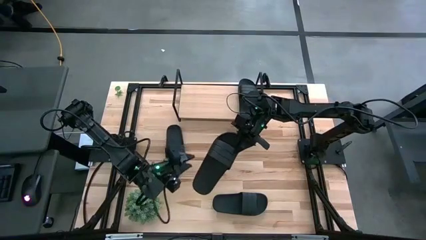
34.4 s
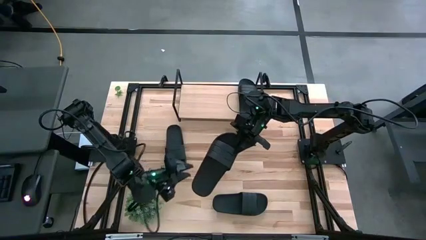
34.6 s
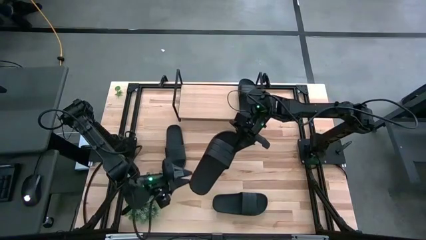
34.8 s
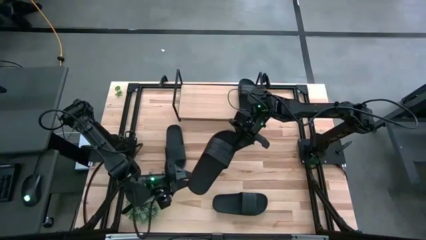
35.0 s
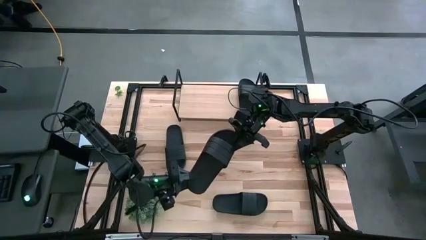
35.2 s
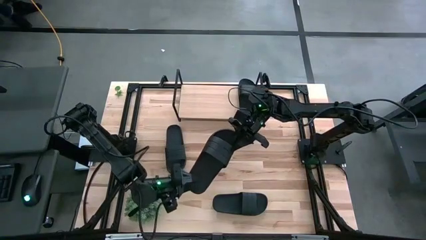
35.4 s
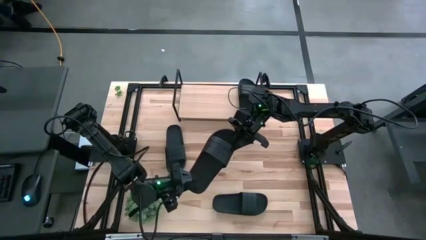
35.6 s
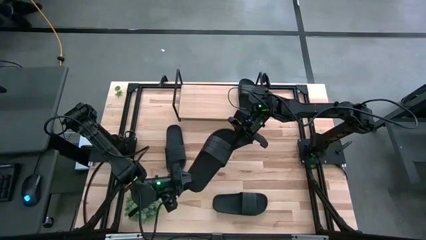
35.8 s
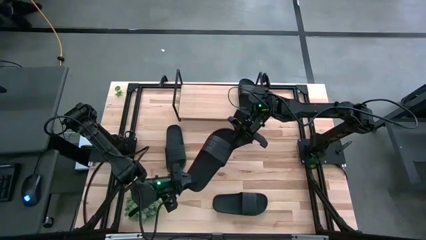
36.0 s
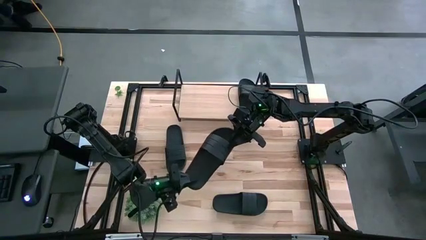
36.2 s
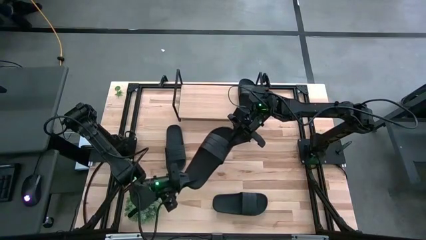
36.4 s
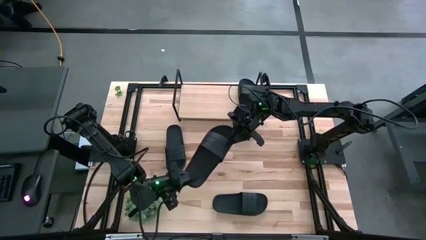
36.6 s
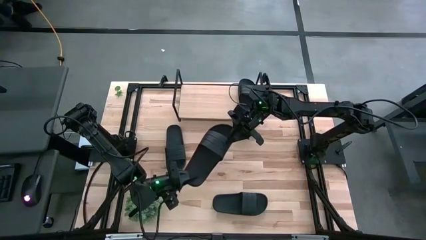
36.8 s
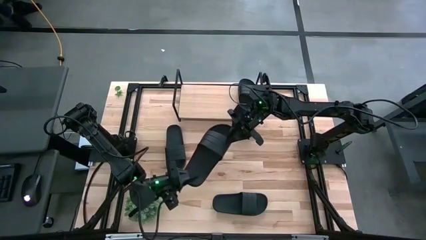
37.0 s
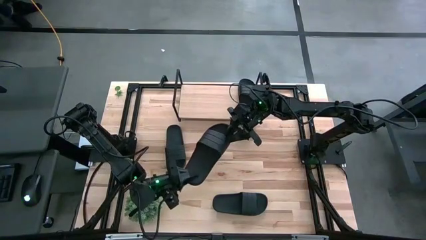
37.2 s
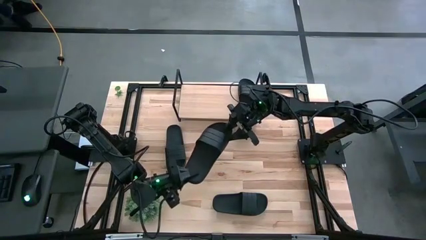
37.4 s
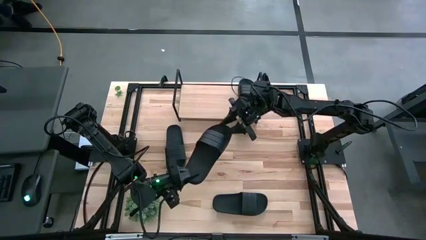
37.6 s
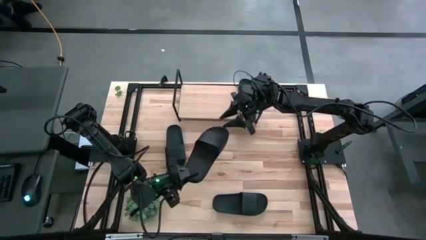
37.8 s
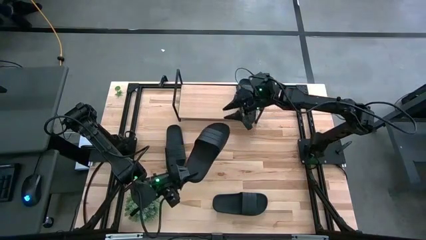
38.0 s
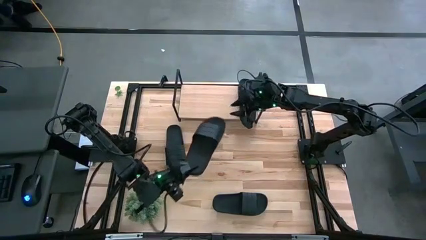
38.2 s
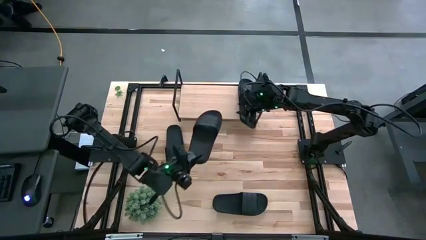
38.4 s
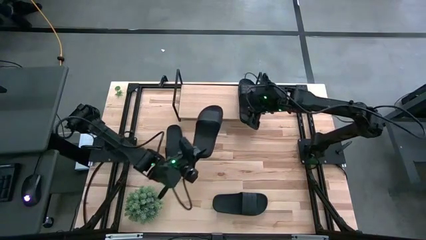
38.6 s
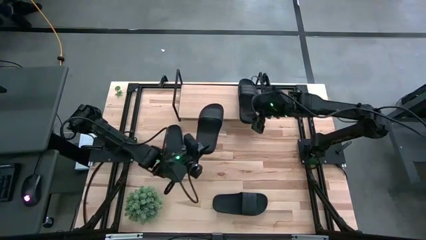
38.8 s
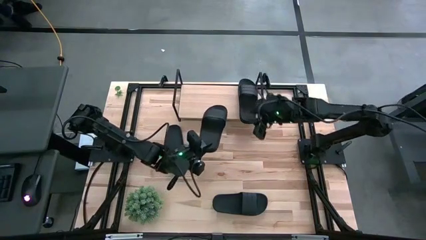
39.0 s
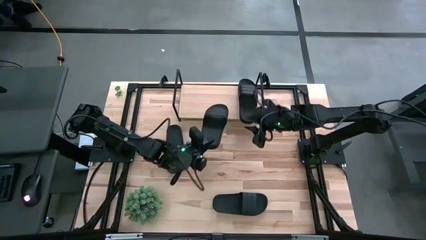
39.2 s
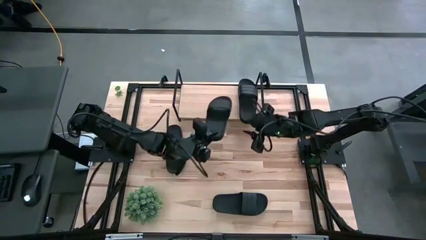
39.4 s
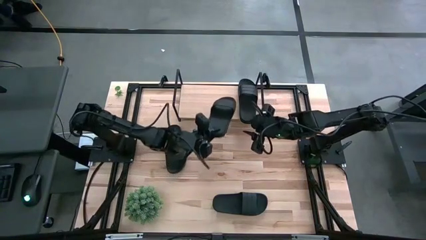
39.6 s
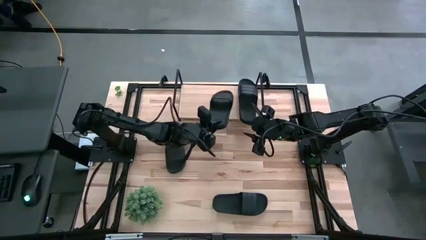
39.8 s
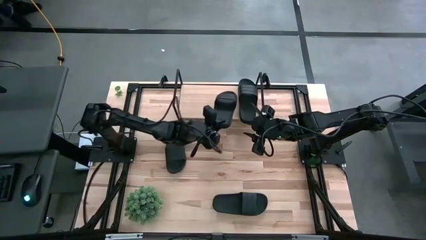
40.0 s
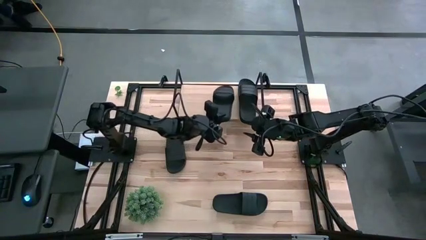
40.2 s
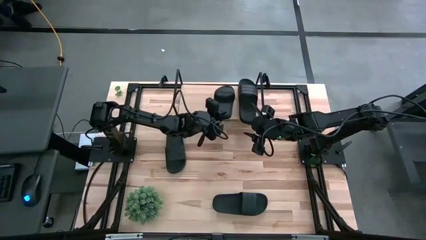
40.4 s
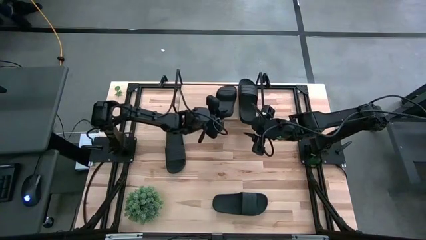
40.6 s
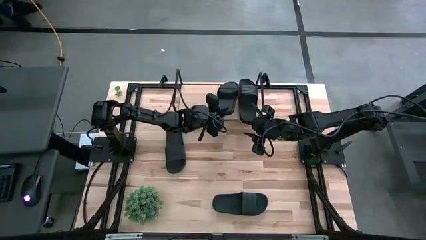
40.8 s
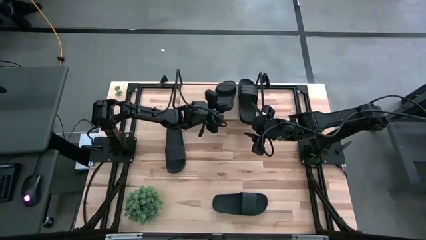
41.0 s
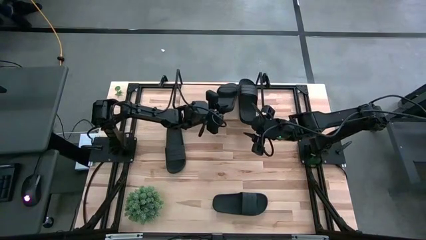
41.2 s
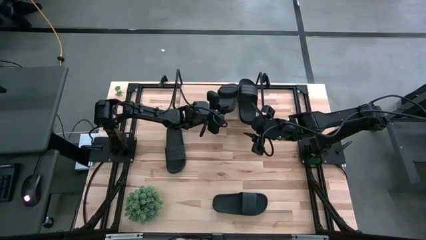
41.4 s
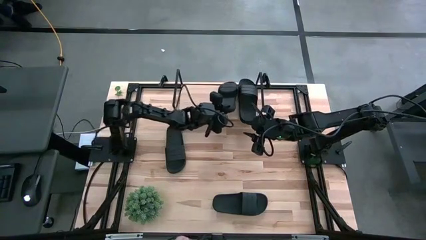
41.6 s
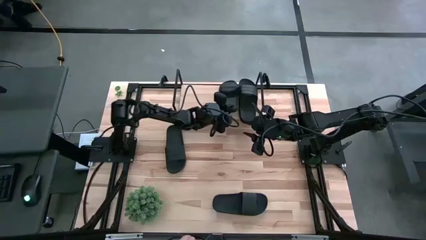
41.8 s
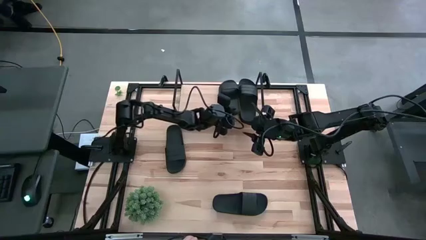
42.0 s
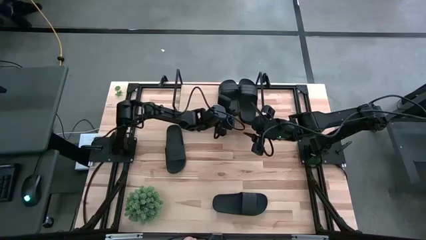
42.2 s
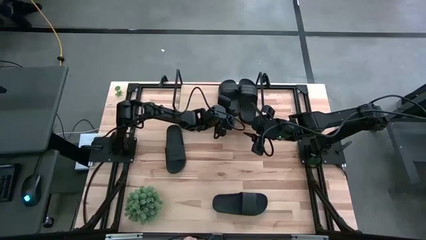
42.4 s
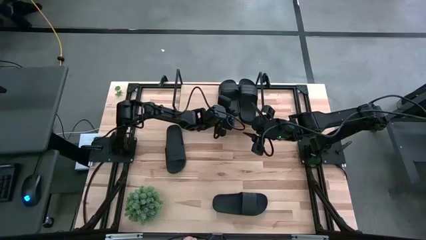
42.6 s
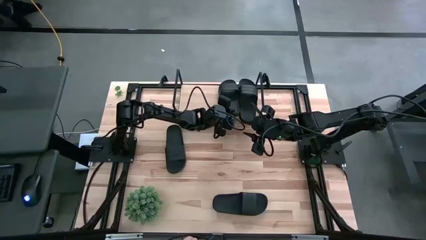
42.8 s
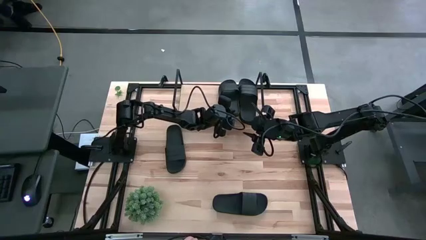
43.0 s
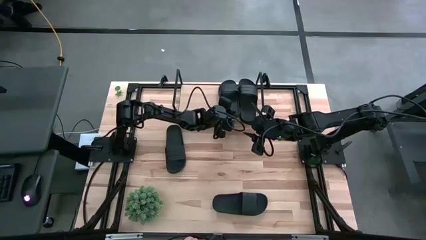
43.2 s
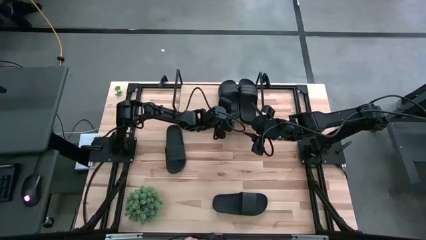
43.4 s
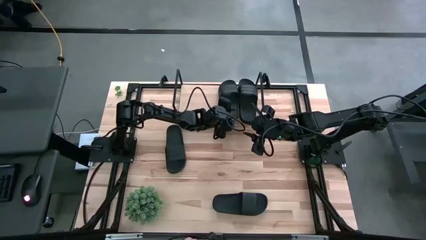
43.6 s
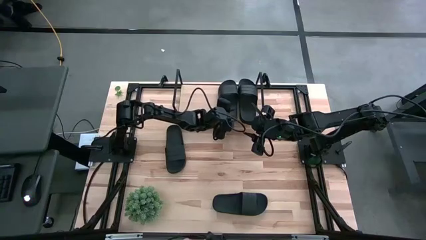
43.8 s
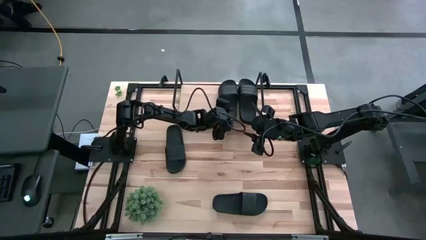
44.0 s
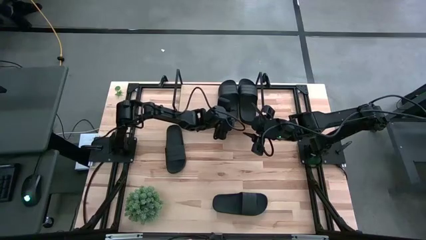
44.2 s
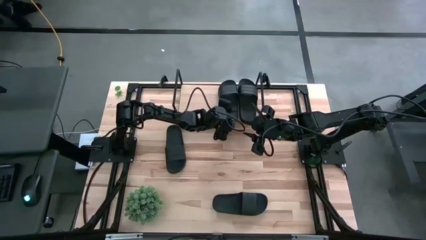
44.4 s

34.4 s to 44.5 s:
Task: Pick and place slides into the shelf
Put the middle black slipper on the shelf

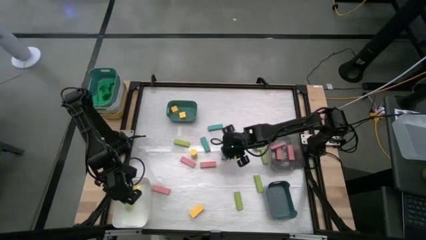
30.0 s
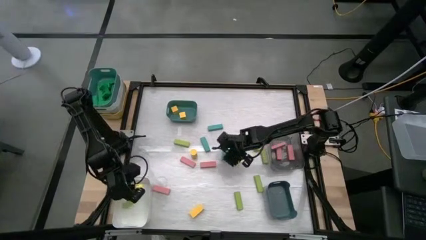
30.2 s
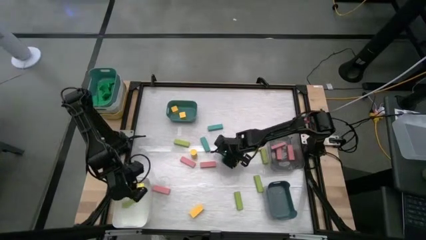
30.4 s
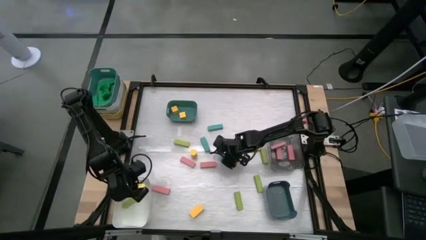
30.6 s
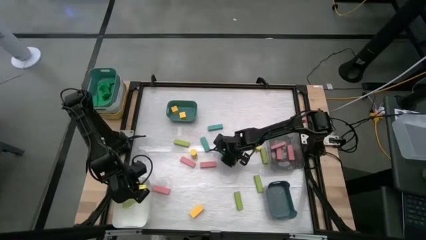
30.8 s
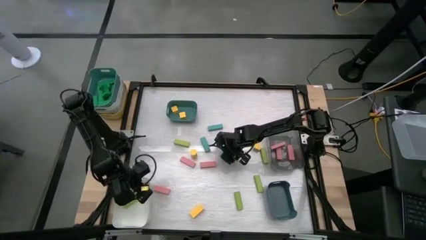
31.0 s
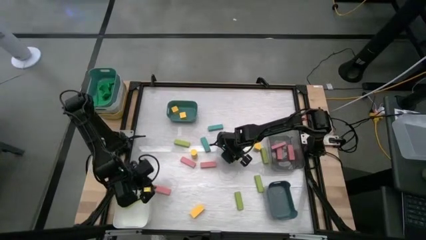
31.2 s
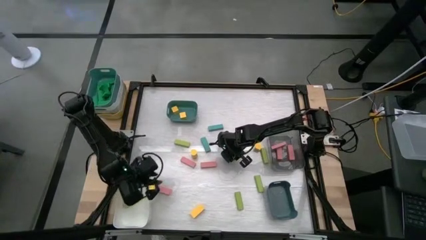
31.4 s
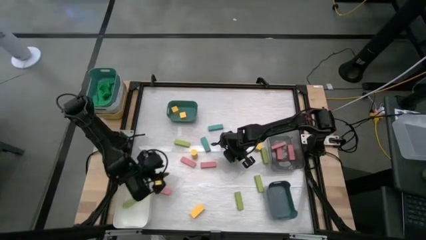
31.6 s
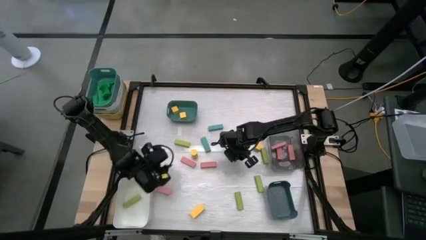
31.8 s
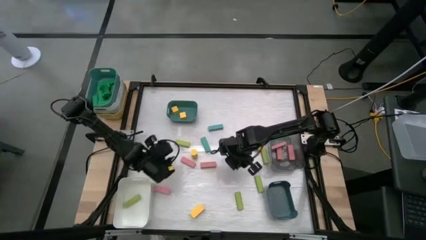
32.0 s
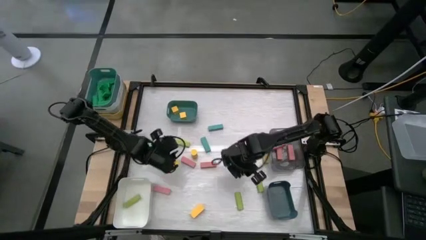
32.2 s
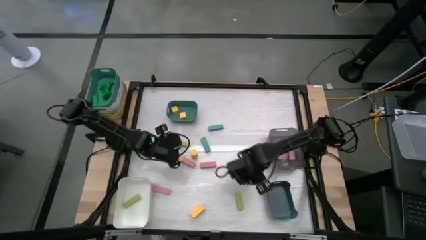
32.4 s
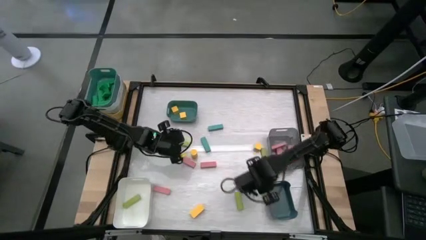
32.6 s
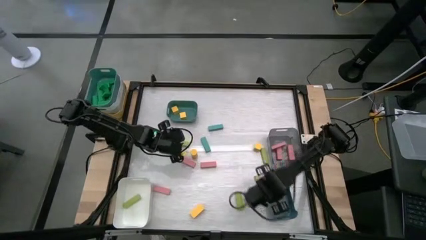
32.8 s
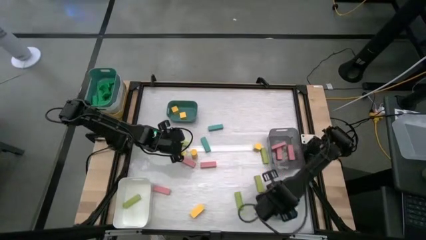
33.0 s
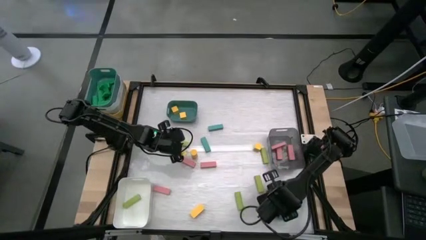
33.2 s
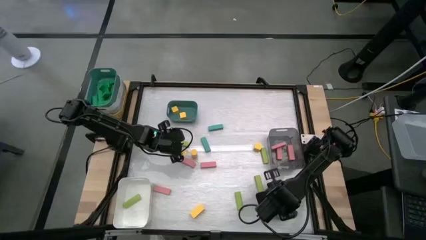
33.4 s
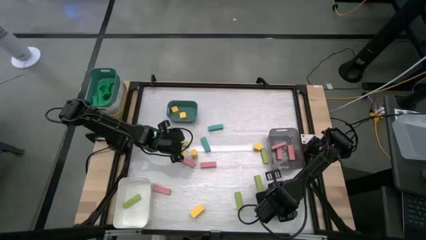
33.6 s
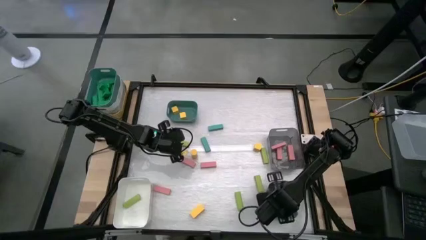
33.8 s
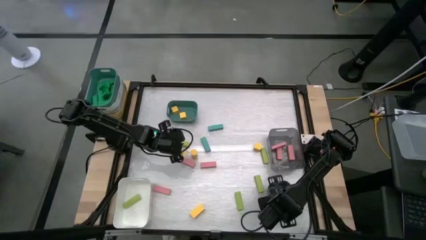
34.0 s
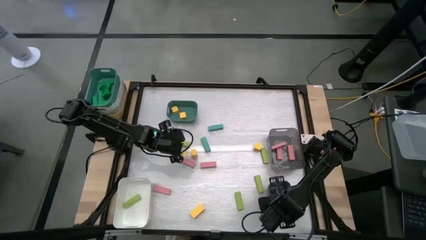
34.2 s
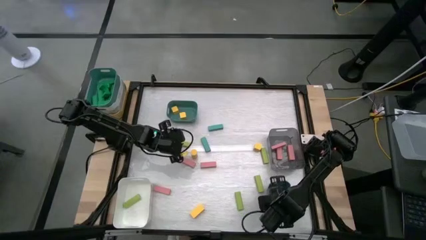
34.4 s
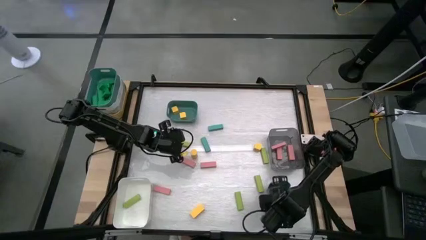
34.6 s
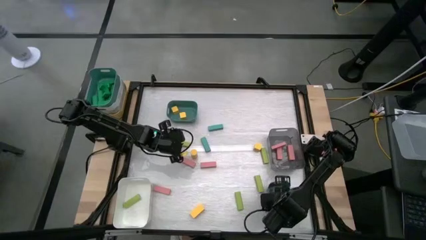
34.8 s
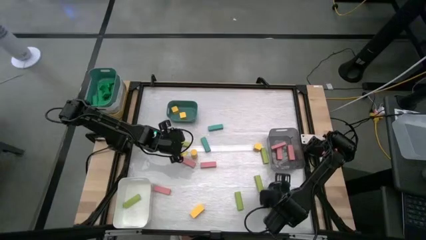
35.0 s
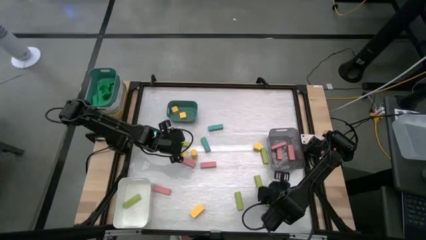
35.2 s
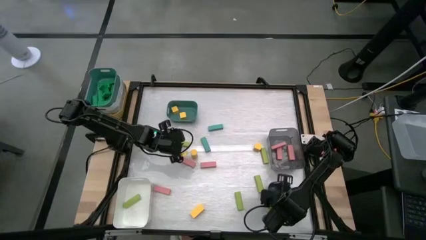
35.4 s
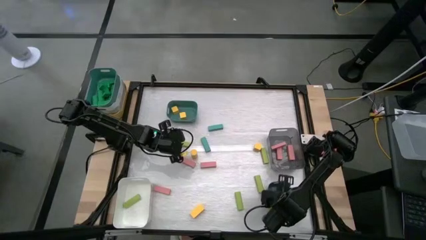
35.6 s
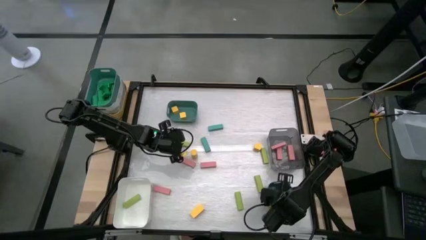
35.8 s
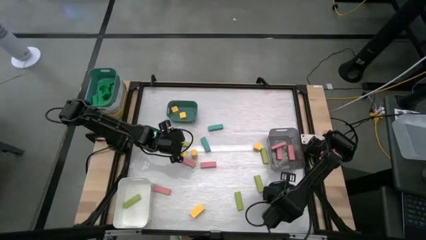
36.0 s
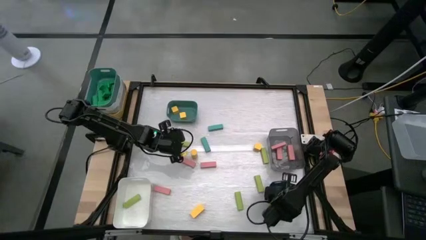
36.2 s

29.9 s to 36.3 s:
Task: Sort blocks
Put the blue block into the blue bin
